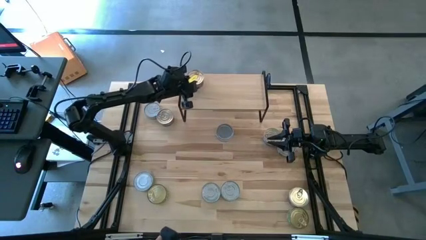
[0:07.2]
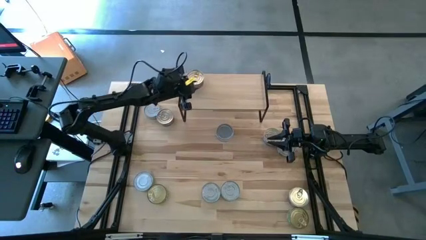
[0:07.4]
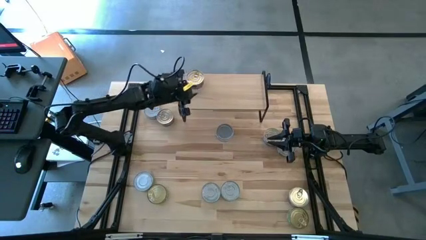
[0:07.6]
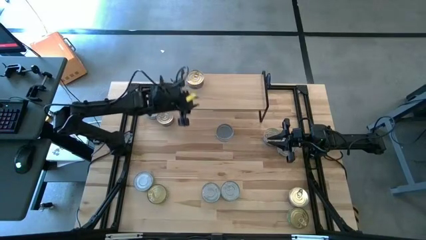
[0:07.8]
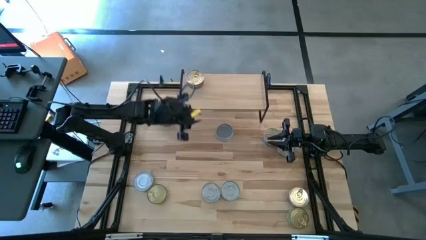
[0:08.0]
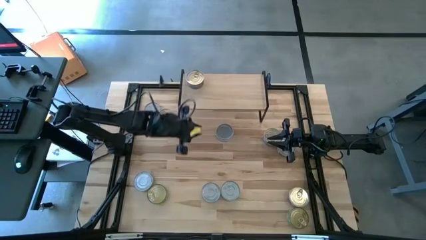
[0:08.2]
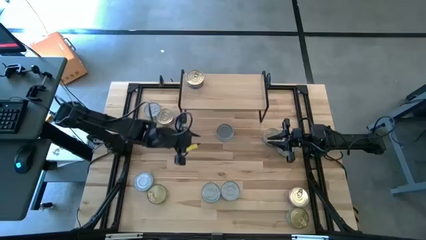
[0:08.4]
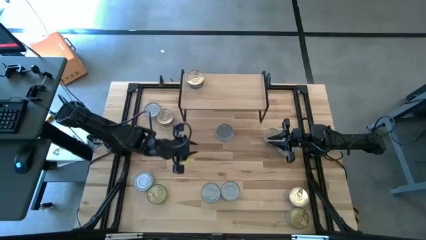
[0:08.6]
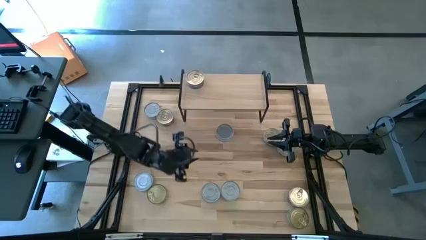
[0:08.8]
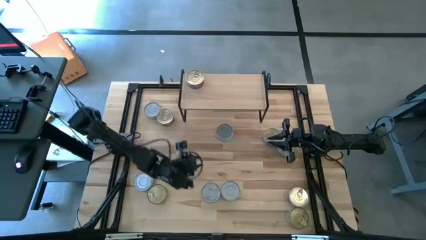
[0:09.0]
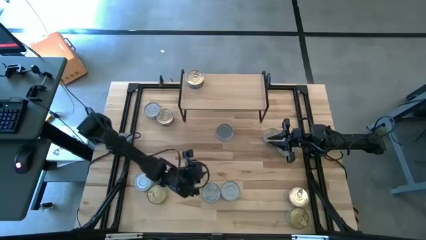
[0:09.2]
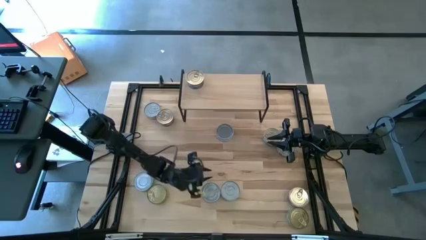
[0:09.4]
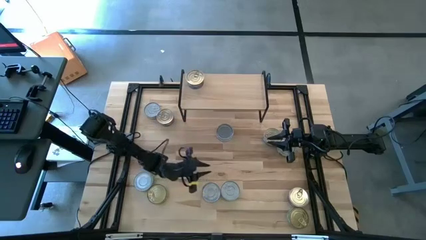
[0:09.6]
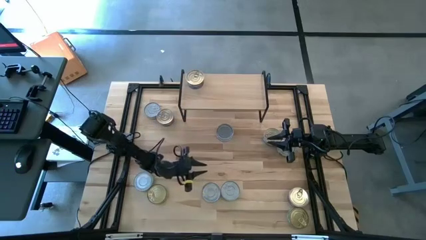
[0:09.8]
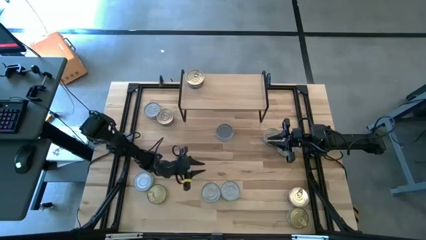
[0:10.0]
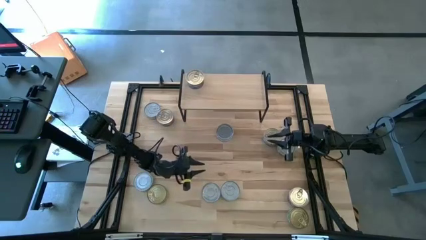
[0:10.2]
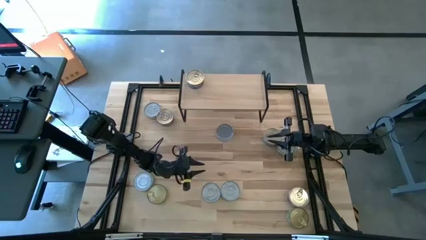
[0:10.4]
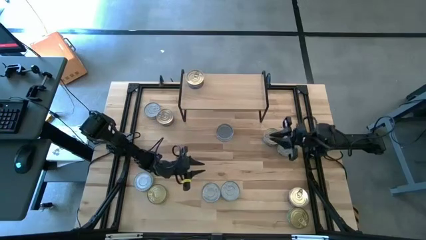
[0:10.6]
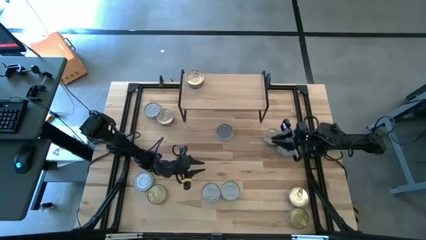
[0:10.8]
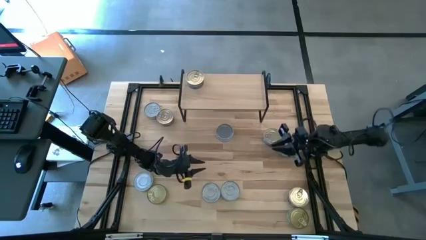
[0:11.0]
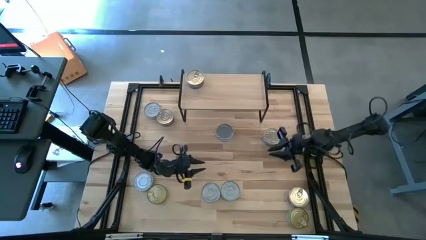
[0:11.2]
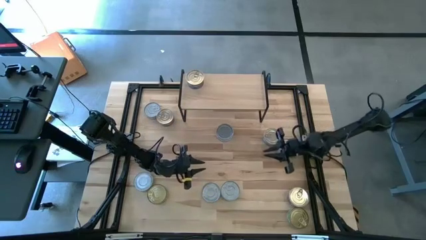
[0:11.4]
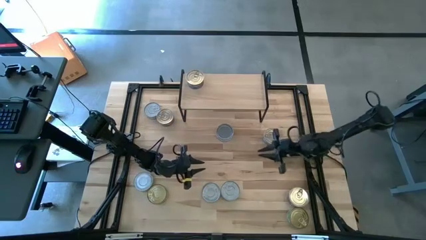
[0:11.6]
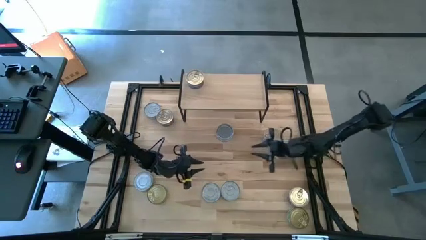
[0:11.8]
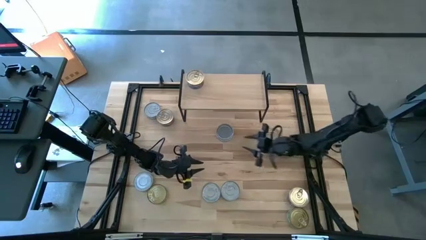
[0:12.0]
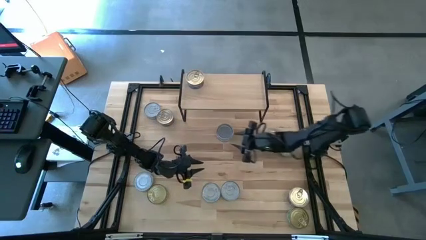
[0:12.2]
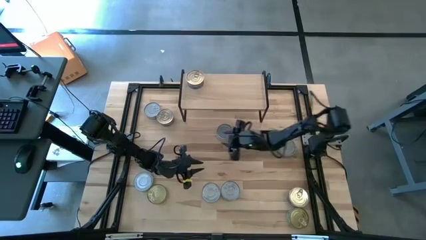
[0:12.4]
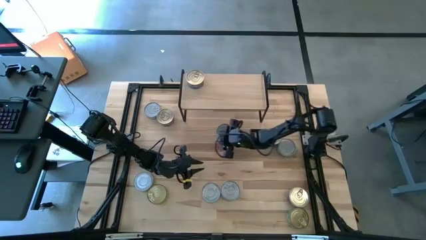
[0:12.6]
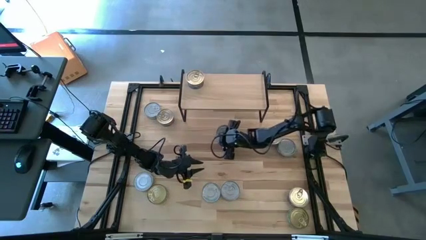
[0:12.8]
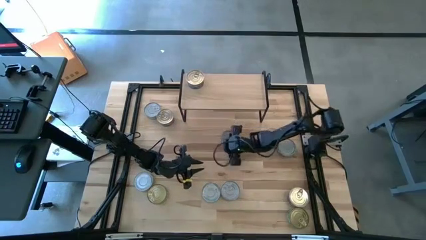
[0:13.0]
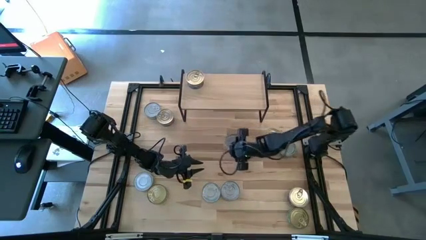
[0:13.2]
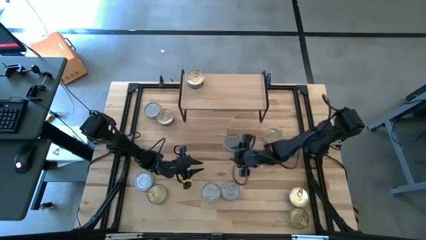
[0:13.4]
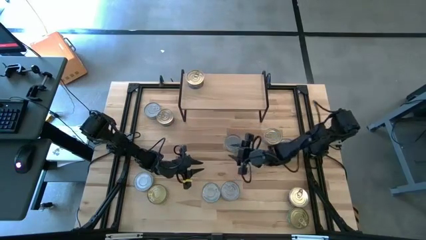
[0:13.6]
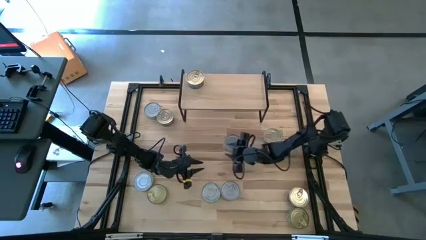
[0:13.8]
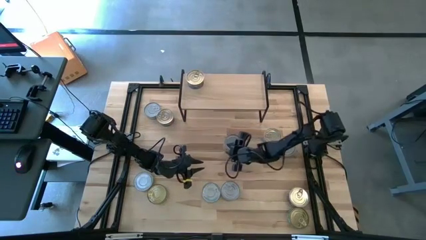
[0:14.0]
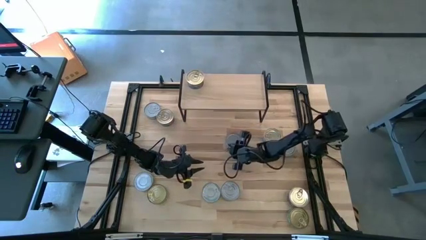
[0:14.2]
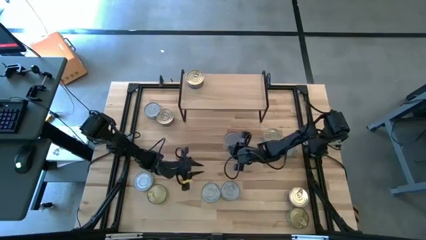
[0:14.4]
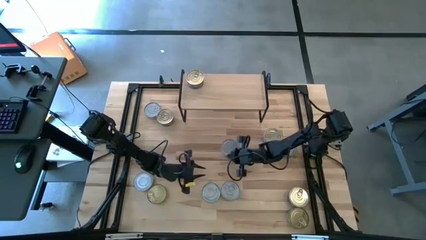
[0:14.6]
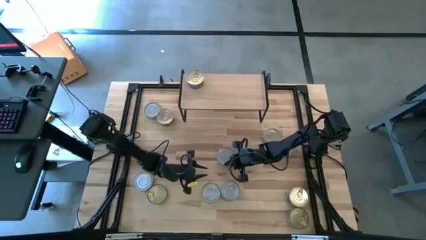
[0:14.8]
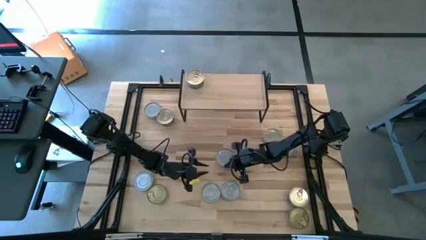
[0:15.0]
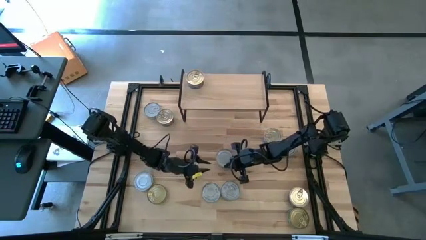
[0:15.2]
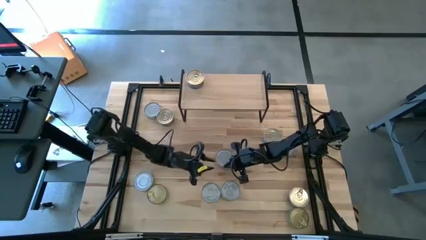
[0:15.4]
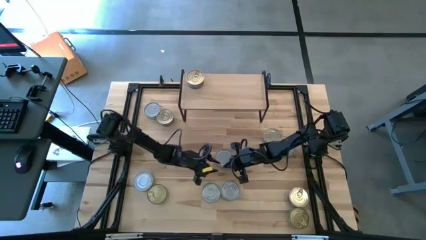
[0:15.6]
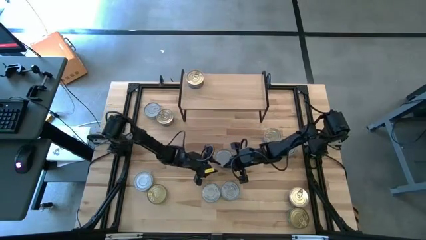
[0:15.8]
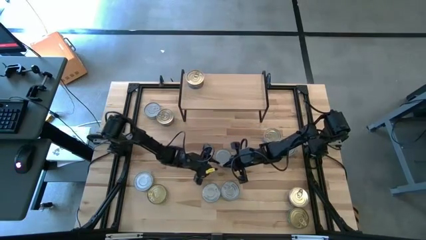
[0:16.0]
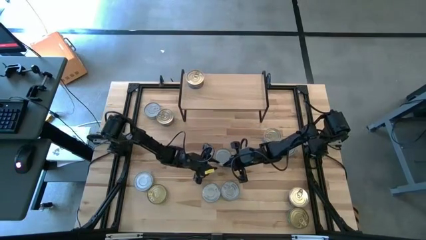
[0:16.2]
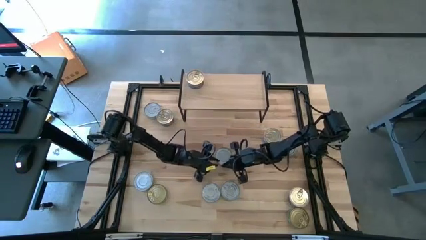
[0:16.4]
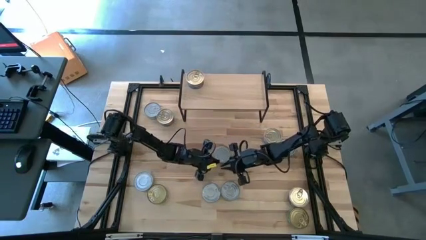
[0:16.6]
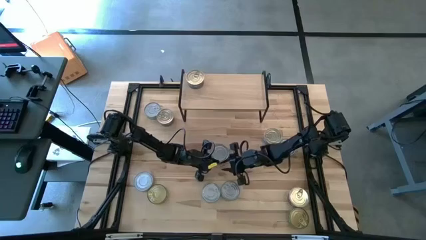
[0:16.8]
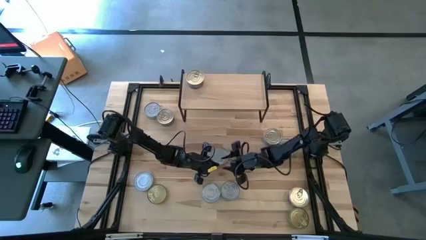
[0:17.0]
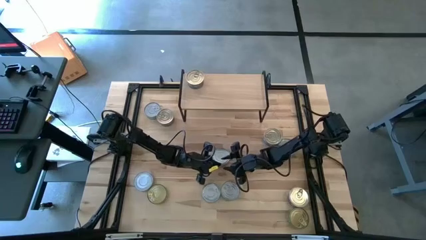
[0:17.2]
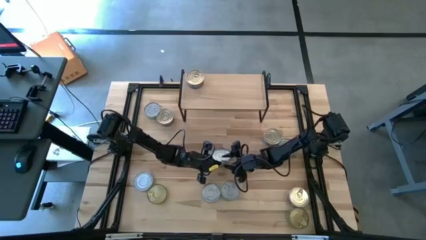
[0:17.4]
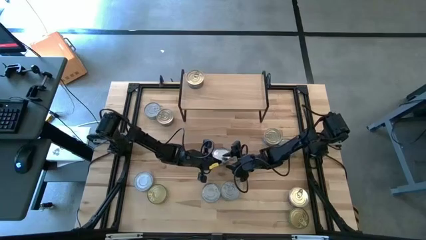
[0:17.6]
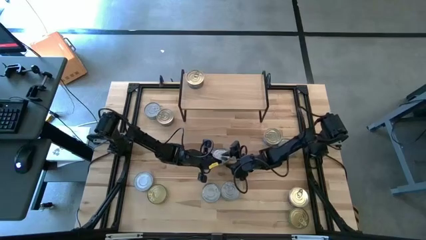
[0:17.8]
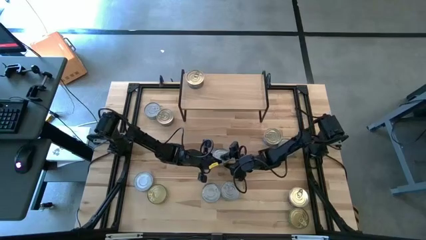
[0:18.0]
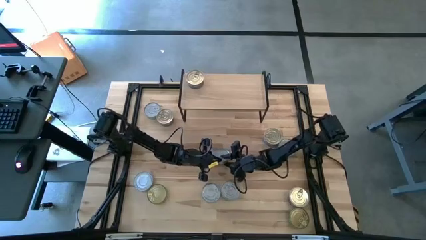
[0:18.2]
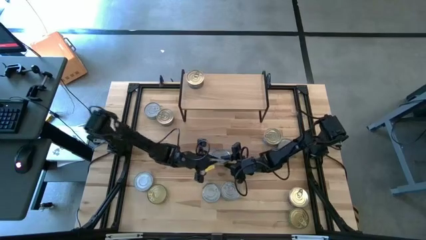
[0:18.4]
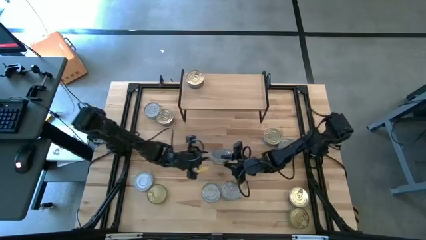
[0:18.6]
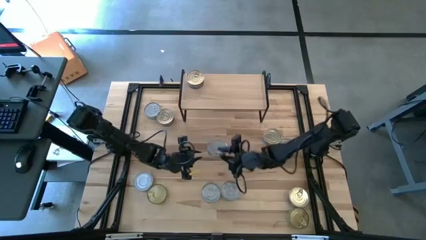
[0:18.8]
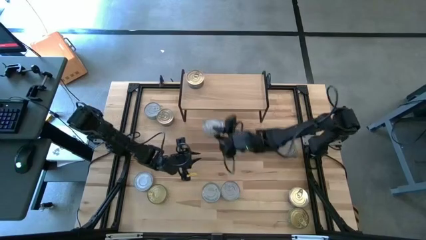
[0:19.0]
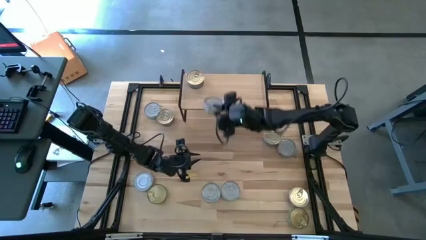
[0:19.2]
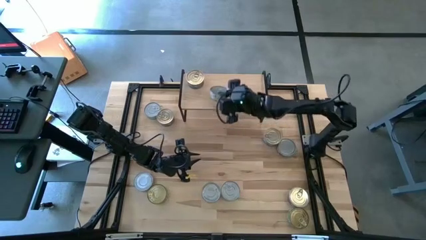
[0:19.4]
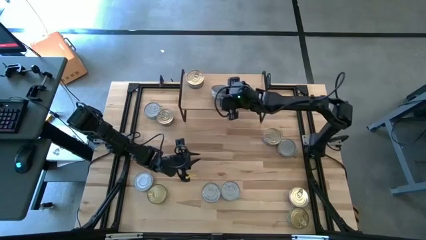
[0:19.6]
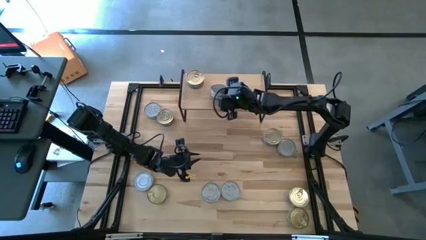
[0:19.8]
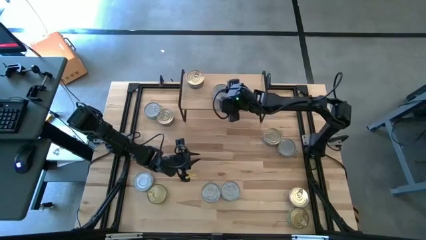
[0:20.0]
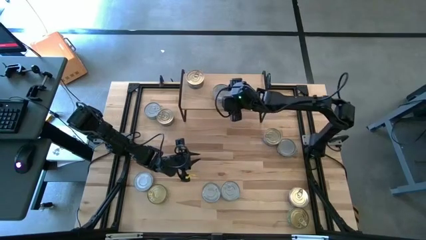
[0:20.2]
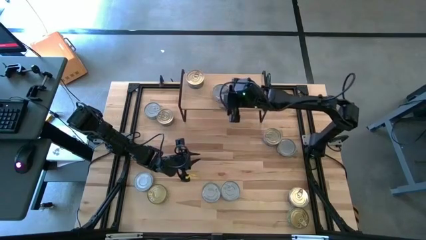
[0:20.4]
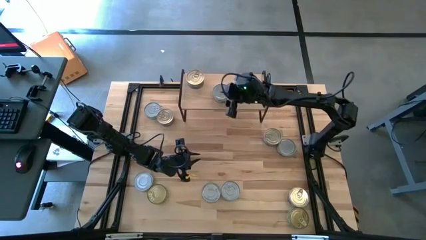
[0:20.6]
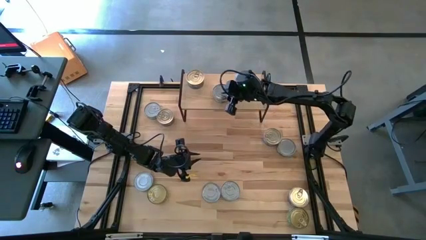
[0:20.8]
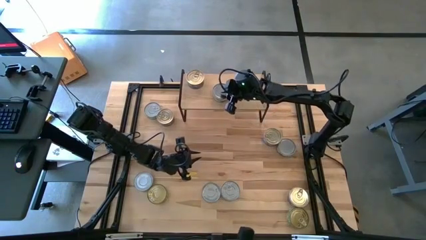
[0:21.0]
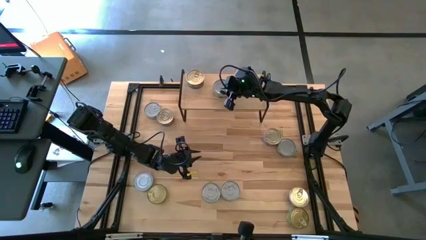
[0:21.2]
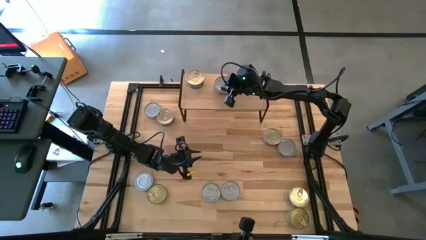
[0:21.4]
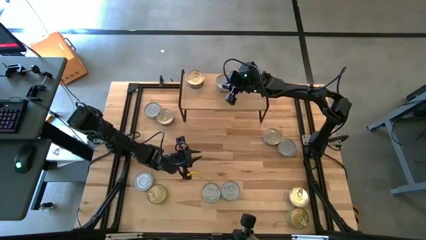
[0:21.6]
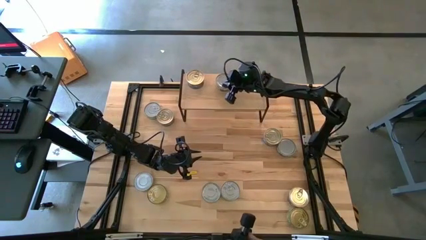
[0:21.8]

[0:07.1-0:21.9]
Task: Stack canned seafood by type on shelf
Put the green white tuna can on the shelf
